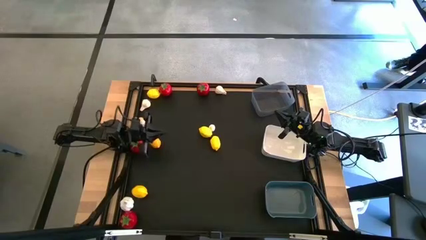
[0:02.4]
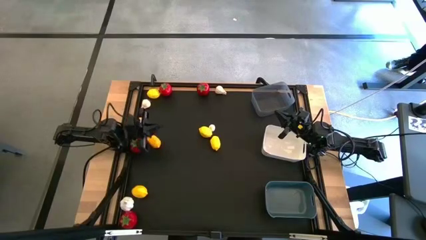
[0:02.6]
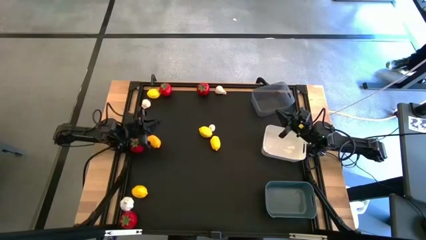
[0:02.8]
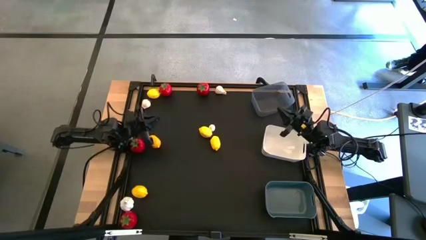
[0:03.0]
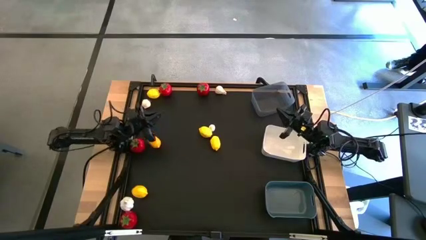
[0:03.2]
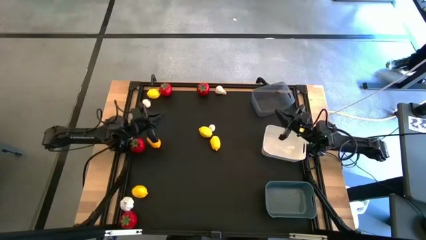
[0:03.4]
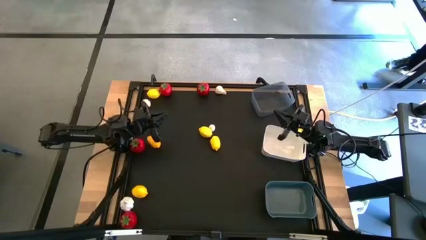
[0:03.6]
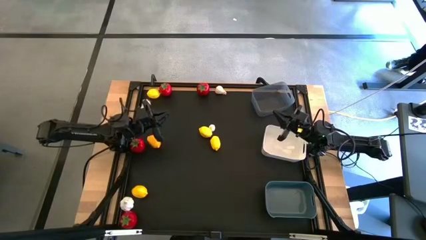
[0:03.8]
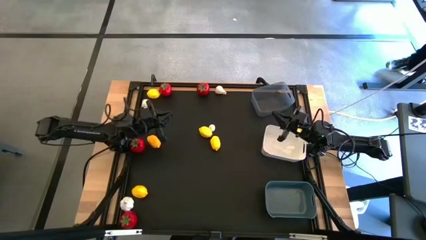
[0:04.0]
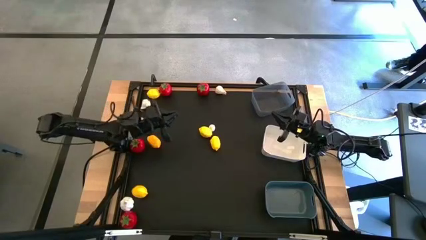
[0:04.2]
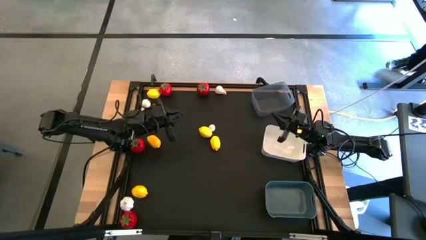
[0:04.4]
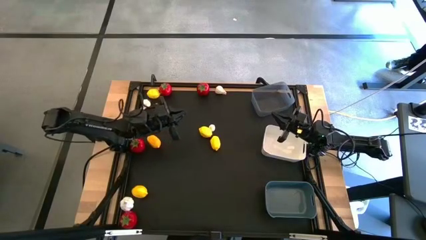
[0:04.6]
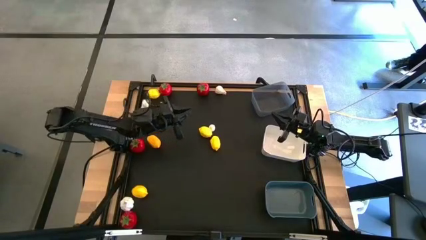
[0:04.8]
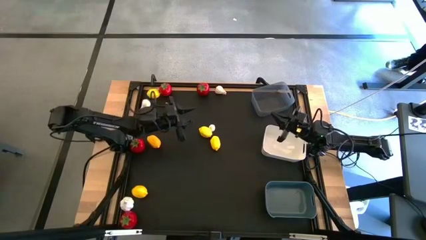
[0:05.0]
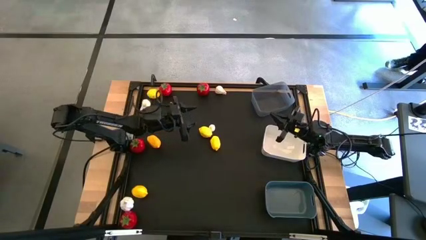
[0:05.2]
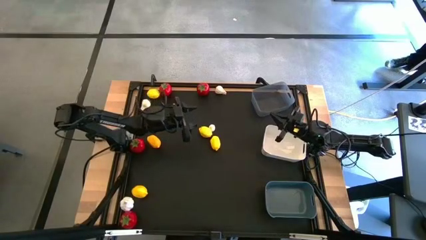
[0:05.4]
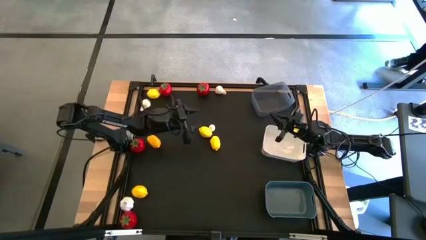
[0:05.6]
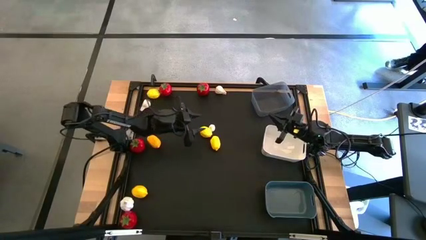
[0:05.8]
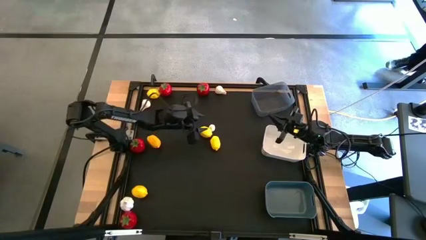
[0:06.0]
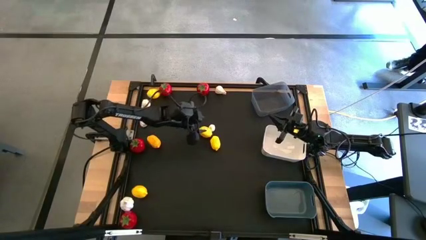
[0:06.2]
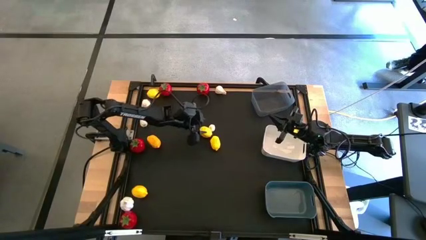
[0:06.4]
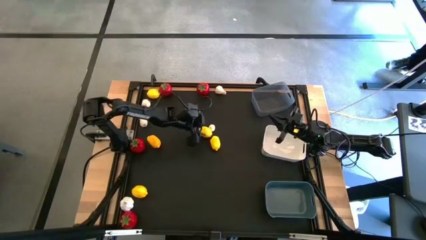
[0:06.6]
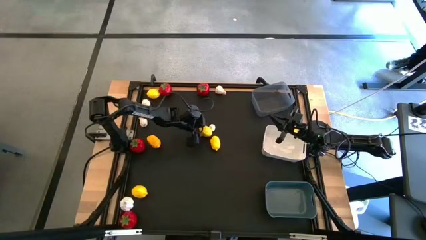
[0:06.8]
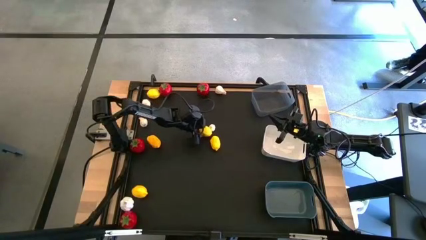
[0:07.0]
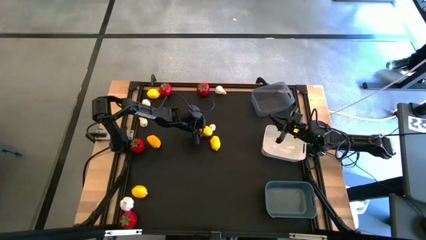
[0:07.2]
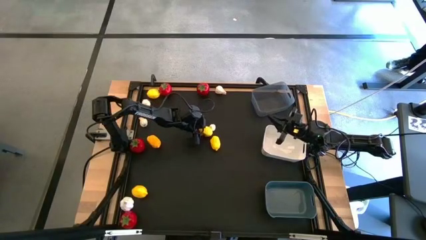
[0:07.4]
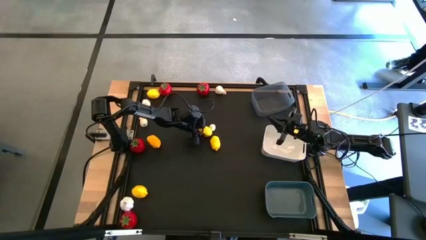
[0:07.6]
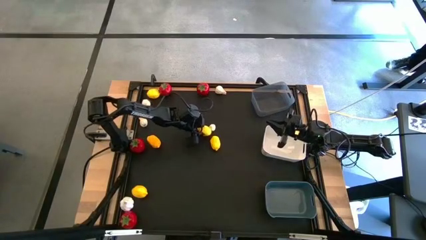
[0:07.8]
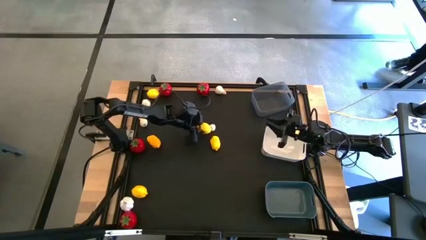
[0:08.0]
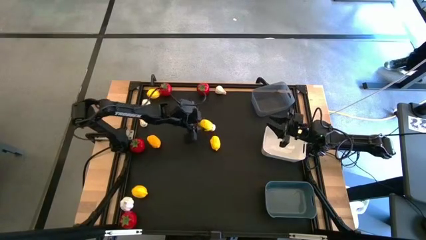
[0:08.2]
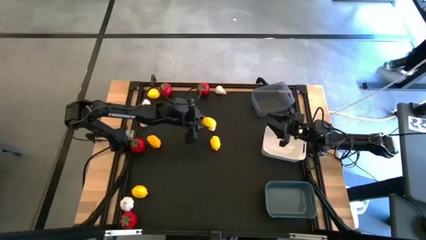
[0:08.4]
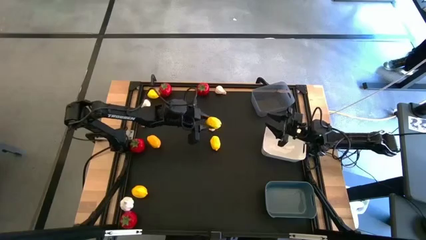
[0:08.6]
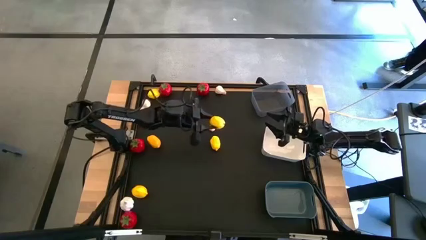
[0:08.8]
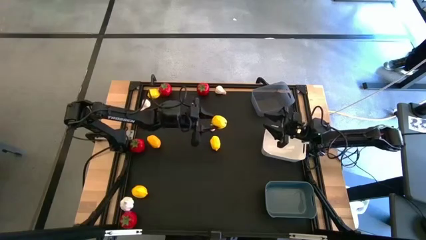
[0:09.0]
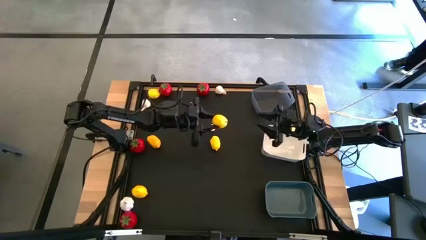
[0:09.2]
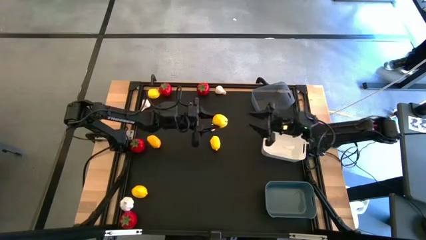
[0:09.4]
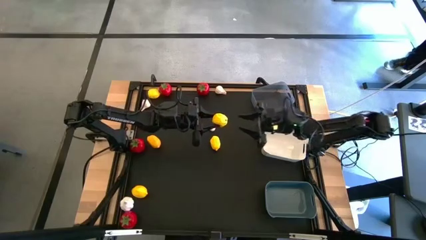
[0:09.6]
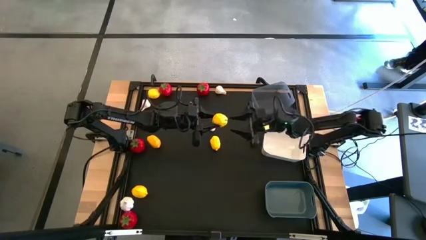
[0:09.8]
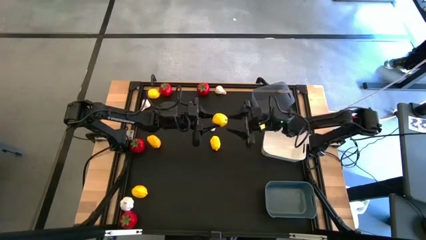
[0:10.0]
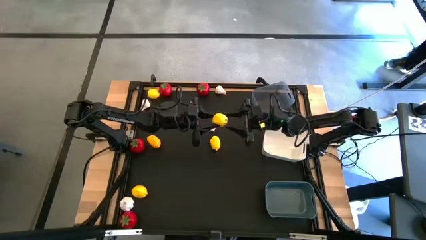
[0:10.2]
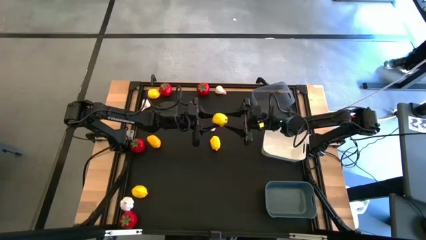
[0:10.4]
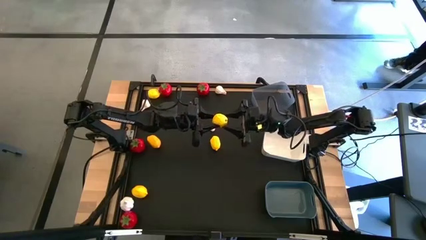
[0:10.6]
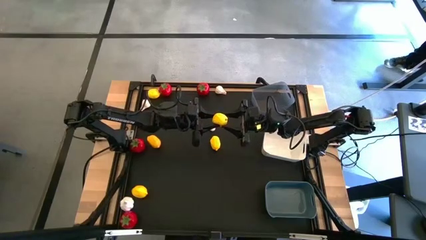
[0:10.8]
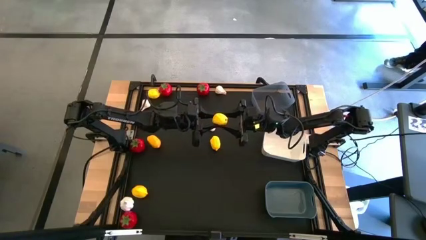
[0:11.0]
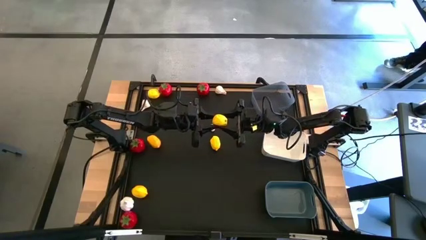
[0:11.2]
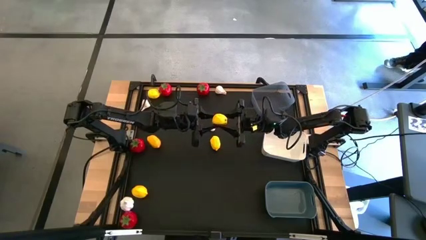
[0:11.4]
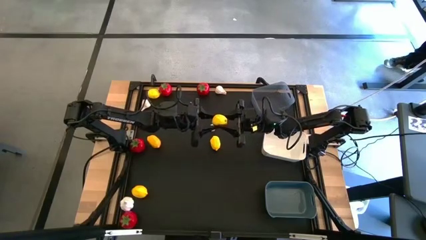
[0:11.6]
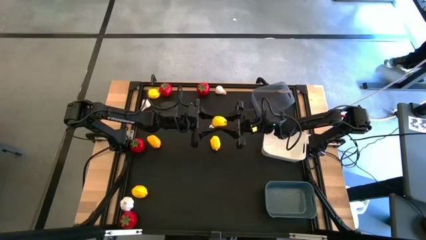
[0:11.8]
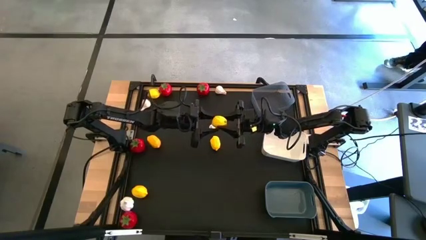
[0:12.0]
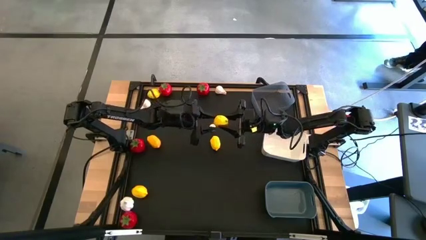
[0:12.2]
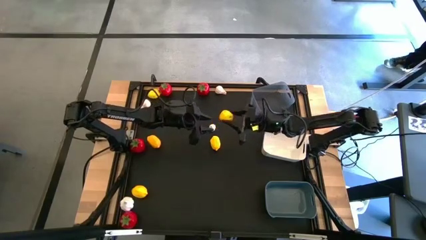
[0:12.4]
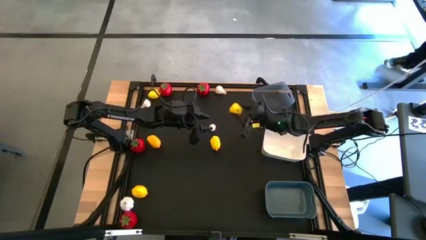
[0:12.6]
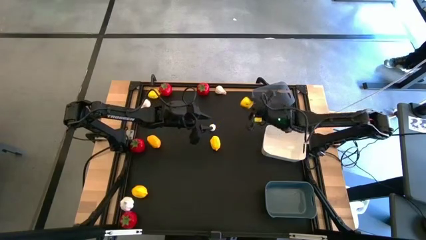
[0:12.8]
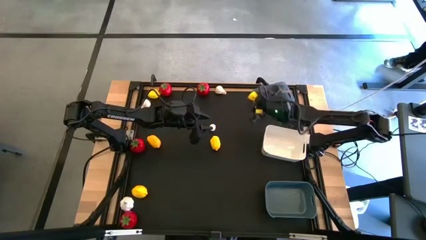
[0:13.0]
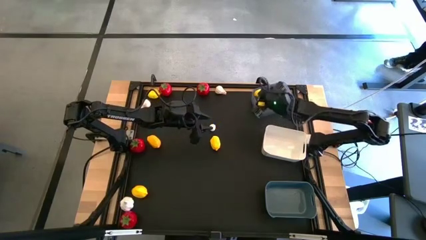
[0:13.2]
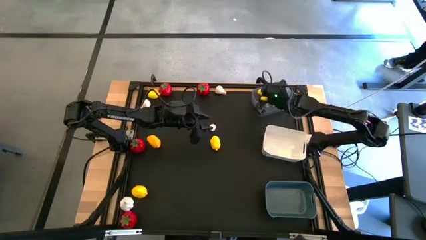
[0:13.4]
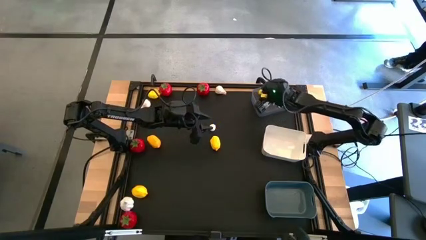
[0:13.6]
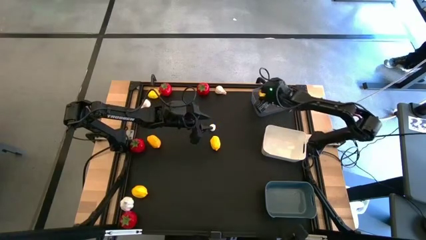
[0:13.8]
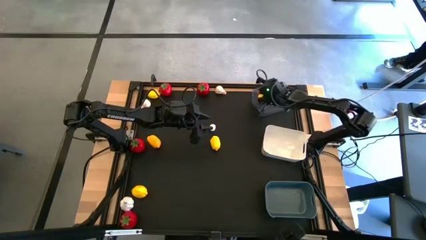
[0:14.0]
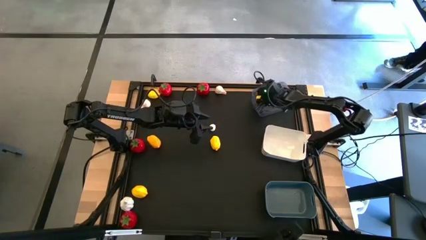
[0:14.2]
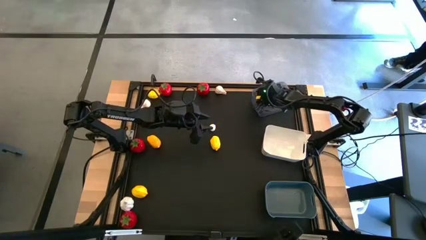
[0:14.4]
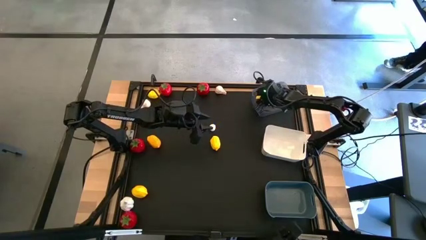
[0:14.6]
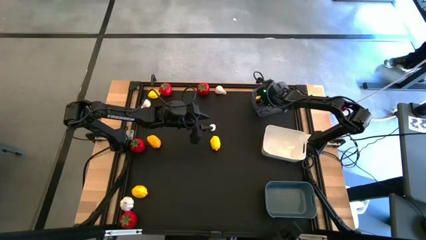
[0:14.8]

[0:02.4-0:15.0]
Task: Sort produce into baskets
Put the lemon into the black bin

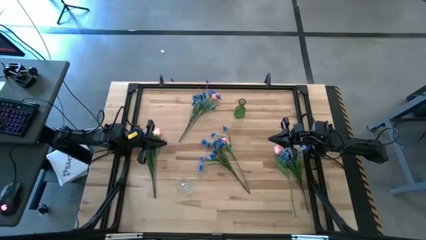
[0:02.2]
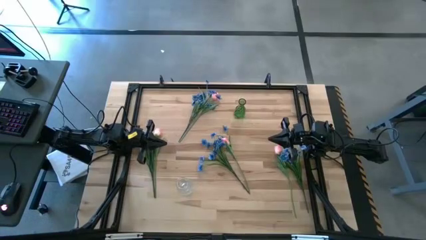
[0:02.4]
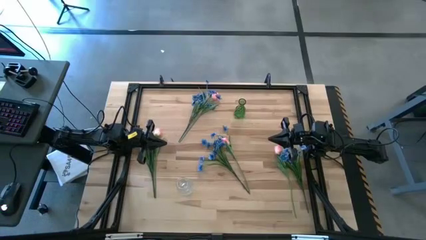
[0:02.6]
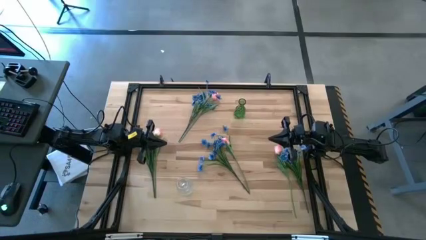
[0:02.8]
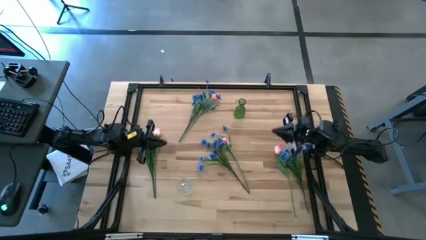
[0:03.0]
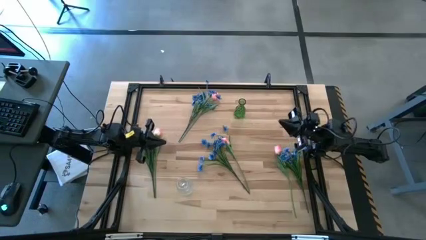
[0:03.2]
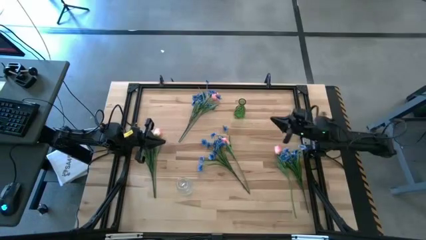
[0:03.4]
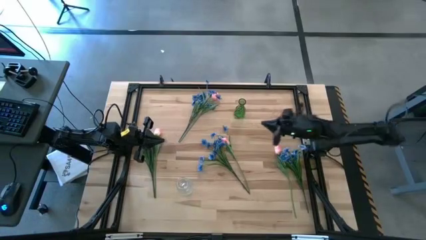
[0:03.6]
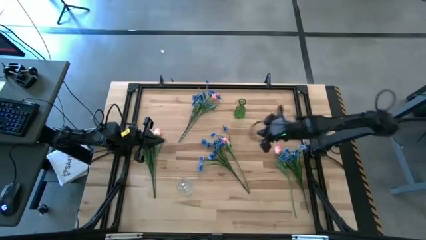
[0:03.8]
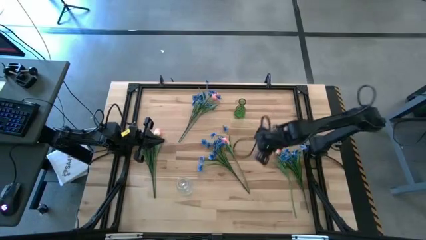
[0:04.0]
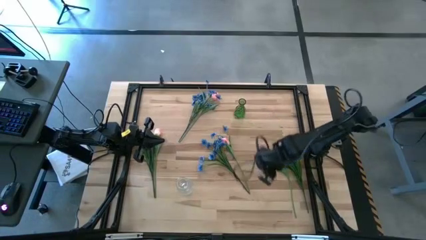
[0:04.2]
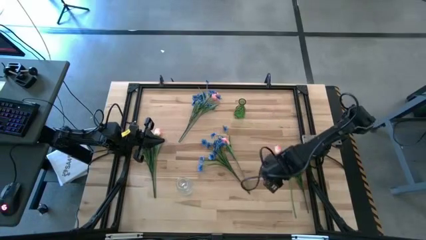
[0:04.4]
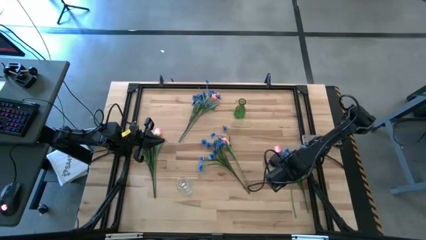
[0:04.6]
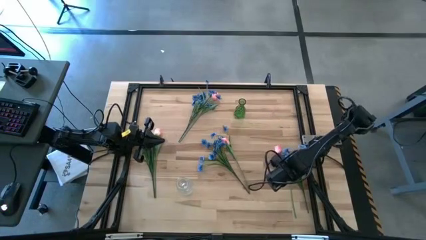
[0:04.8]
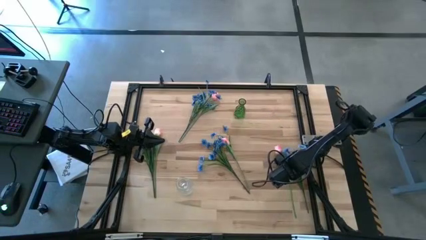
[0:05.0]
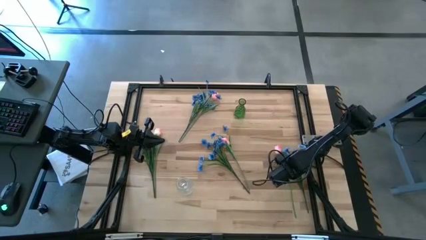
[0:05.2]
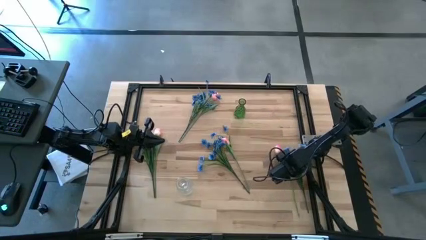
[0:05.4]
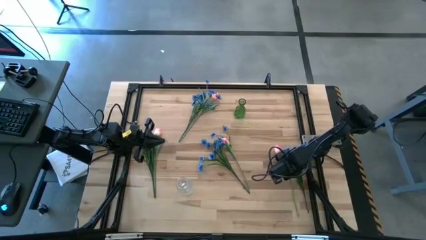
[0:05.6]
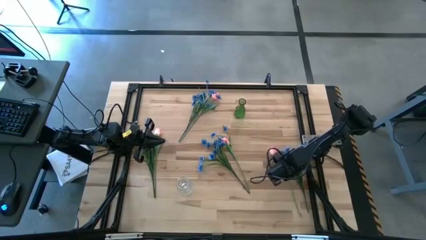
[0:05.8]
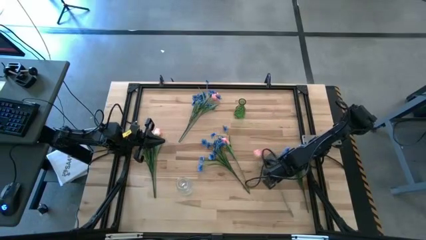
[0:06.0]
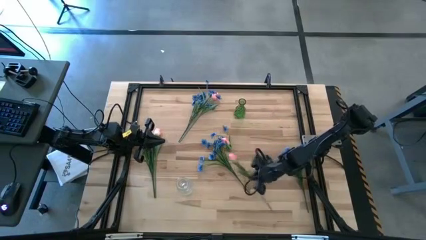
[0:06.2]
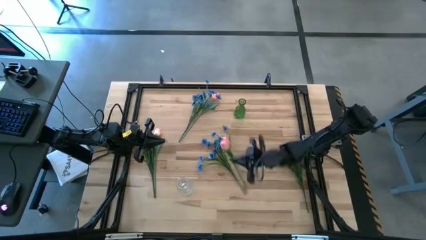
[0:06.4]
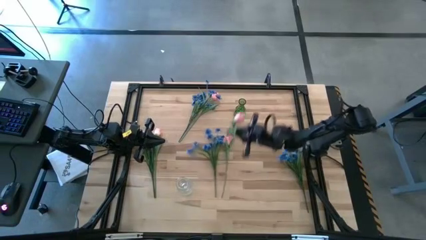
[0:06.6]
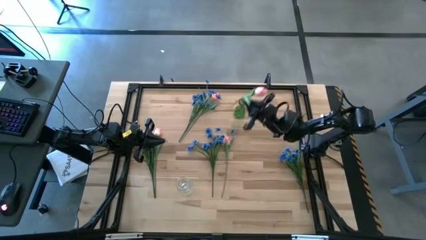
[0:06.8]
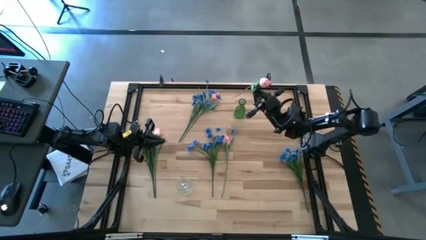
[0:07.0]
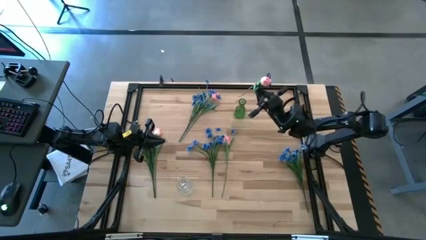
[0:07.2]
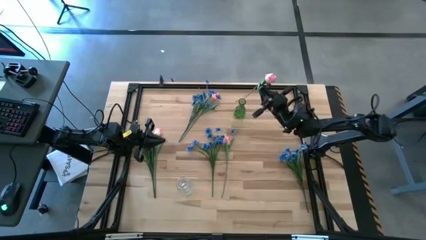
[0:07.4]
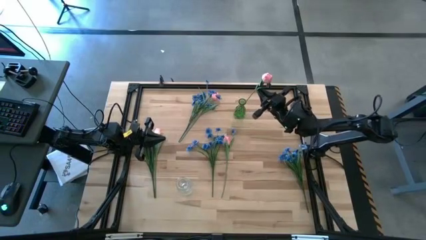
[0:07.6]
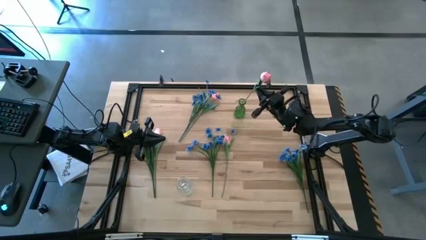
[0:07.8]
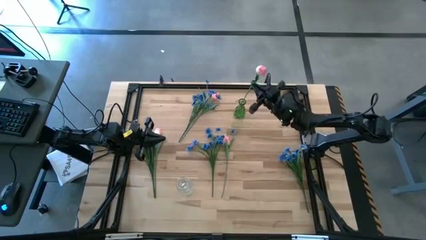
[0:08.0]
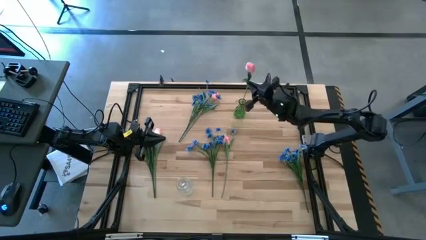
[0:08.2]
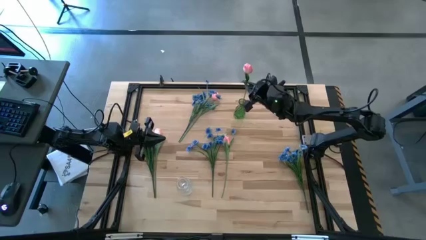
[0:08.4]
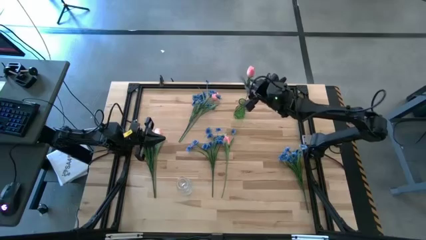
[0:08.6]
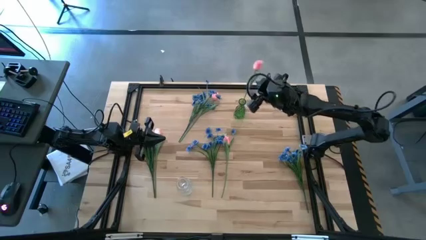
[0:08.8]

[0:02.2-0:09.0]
Task: Sort flowers into vase by color
Put the pink flower into the green vase
